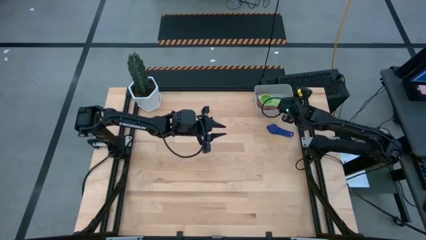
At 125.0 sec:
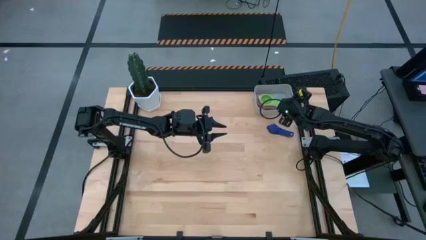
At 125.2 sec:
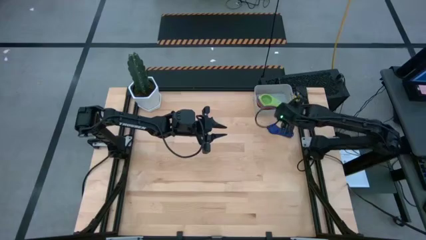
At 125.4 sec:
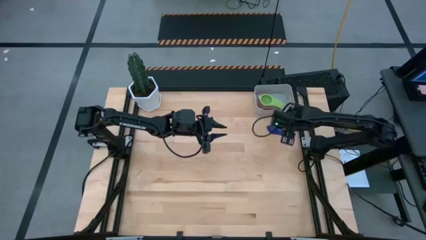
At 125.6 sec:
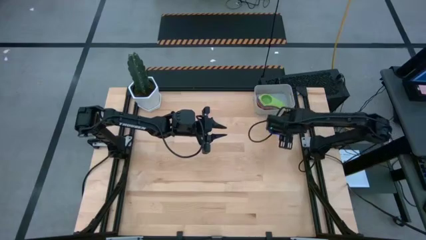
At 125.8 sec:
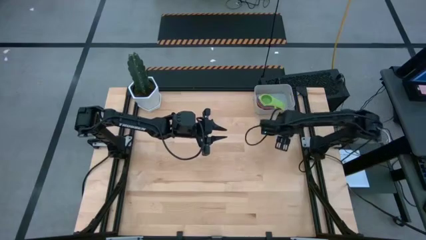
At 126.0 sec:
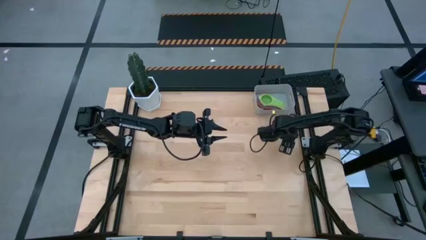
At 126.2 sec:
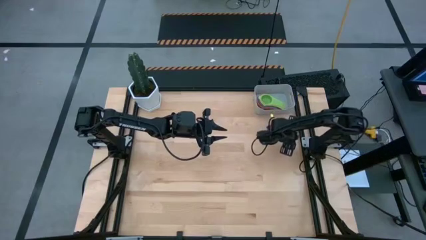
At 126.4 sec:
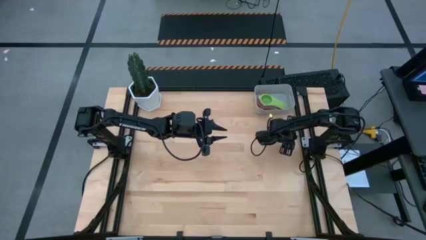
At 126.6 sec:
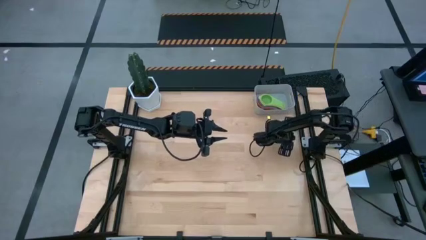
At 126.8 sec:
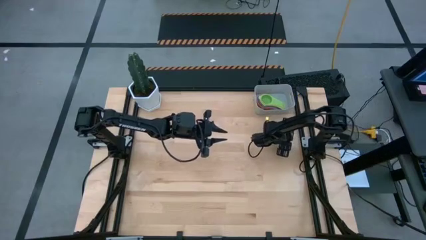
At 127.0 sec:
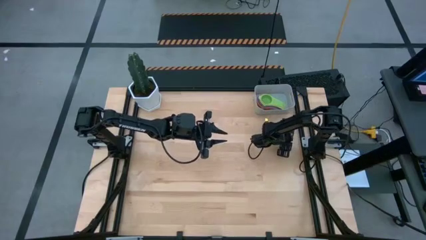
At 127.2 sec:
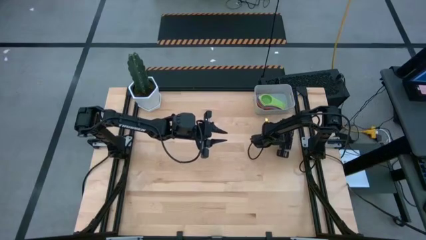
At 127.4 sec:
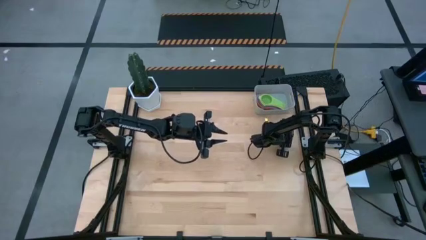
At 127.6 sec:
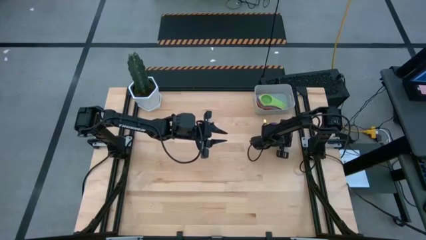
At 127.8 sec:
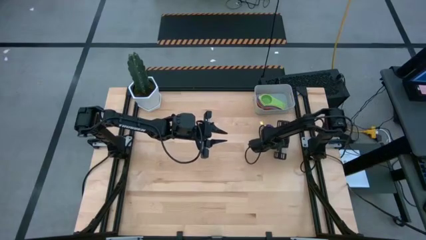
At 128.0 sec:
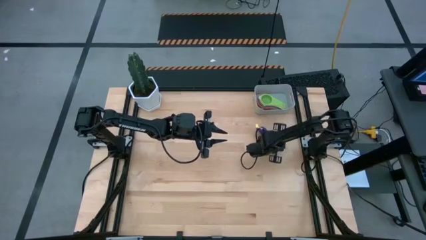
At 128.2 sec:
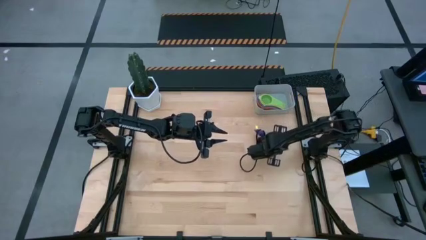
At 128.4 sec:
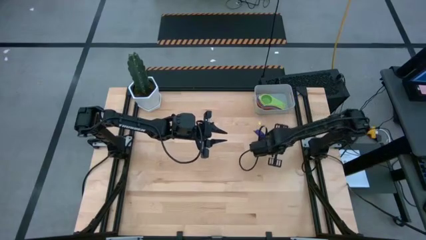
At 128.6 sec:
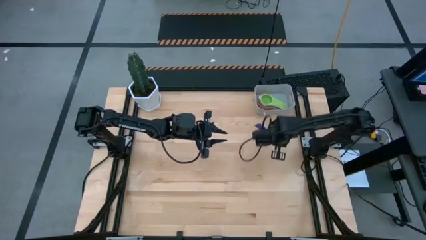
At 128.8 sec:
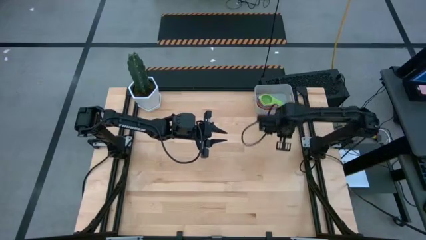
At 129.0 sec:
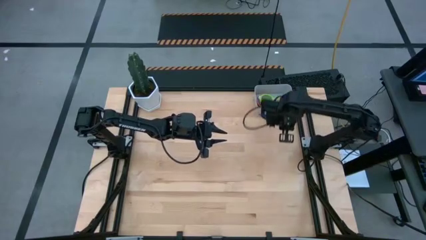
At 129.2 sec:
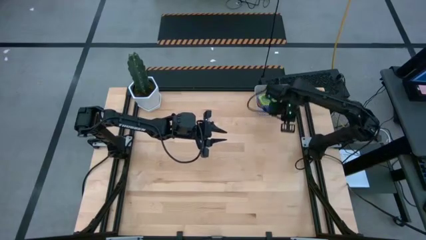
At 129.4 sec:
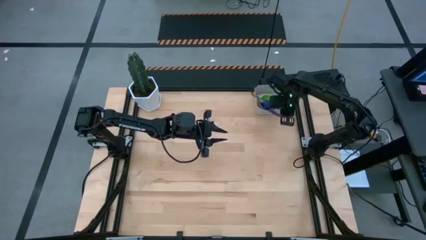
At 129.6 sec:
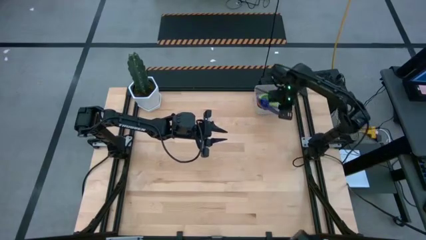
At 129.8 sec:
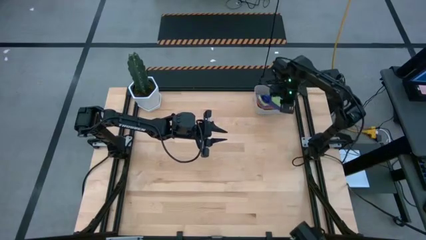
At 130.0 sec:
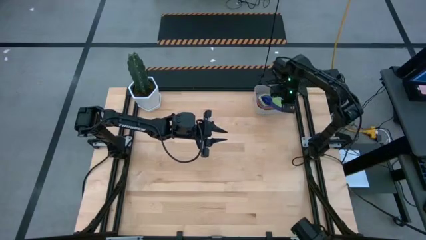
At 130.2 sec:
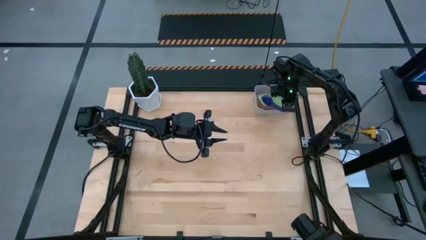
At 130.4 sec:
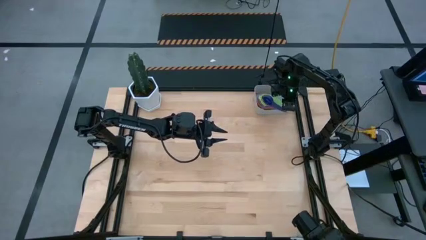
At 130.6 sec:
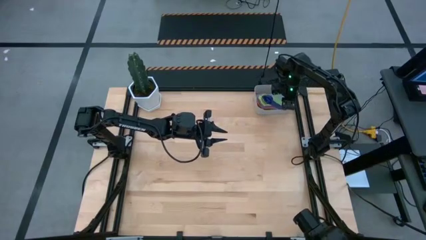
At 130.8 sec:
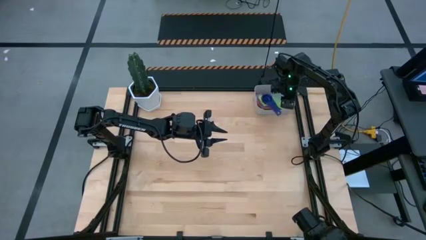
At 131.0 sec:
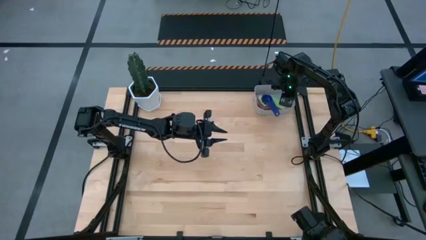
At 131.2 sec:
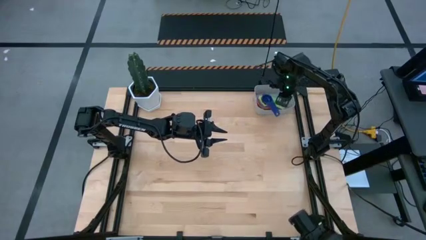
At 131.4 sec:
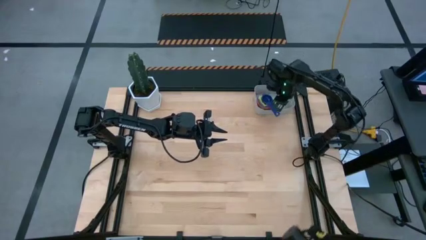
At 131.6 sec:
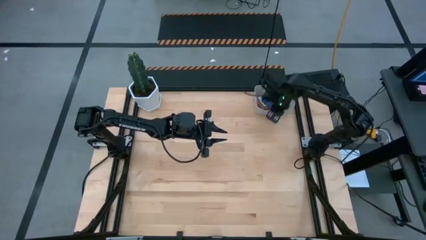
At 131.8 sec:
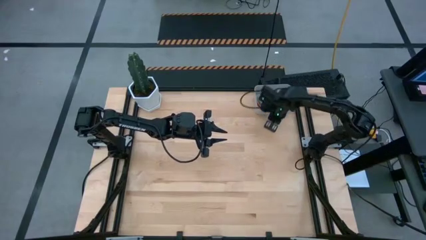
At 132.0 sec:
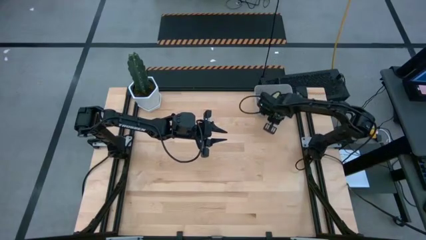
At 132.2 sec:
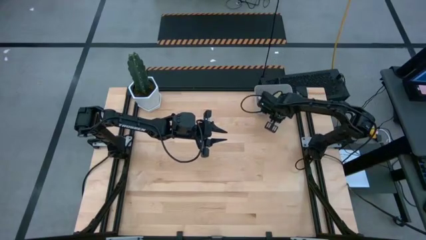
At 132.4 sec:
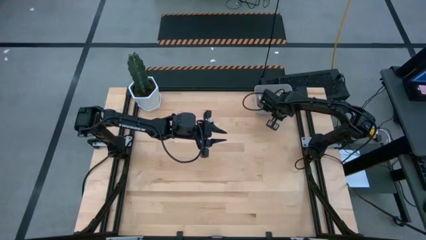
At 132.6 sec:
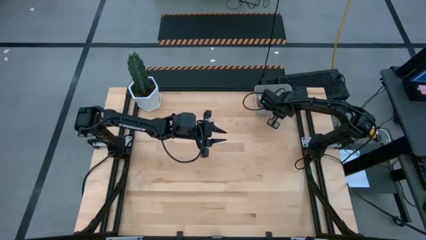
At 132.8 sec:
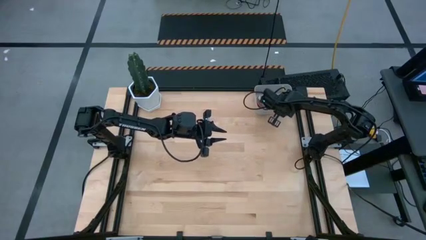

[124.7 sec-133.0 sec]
Task: Nest measuring cups in basket
Stack the dark blue measuring cup on top of the green measuring cup into the gray bin

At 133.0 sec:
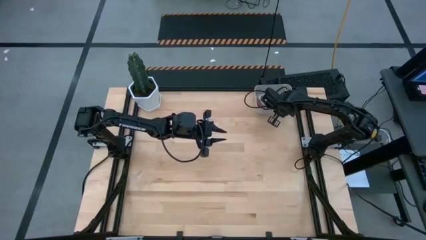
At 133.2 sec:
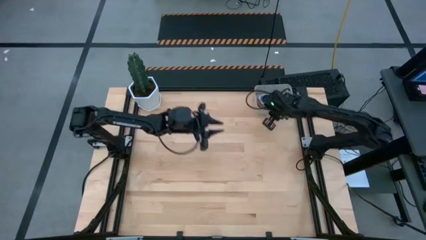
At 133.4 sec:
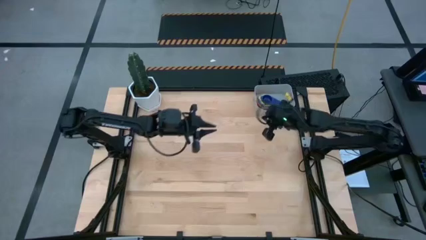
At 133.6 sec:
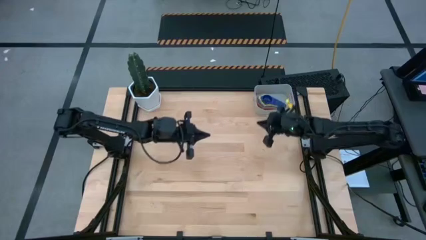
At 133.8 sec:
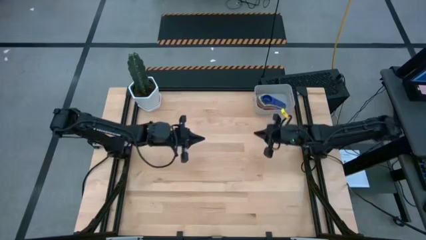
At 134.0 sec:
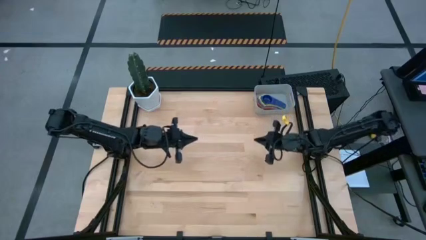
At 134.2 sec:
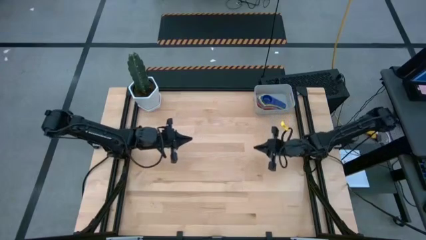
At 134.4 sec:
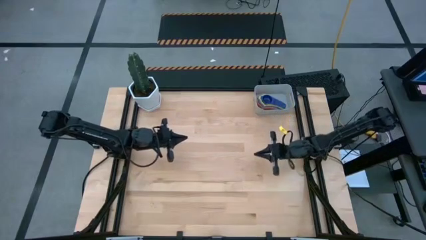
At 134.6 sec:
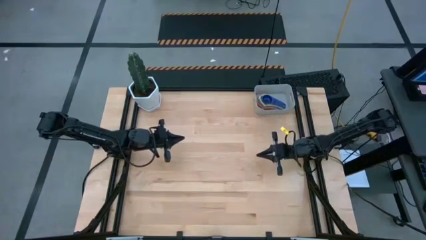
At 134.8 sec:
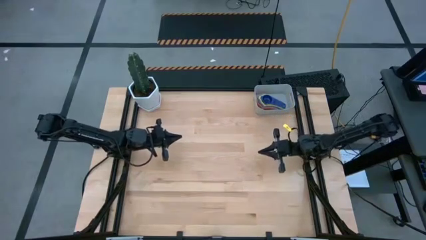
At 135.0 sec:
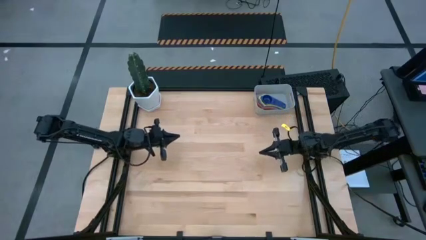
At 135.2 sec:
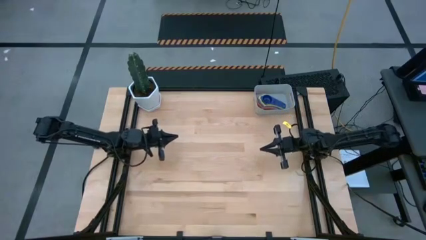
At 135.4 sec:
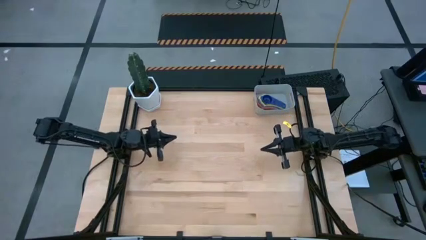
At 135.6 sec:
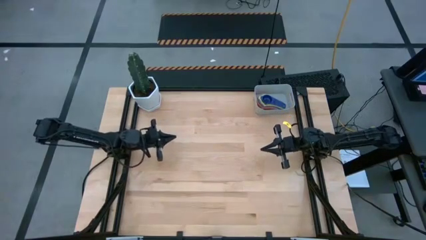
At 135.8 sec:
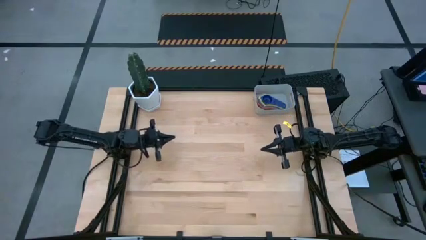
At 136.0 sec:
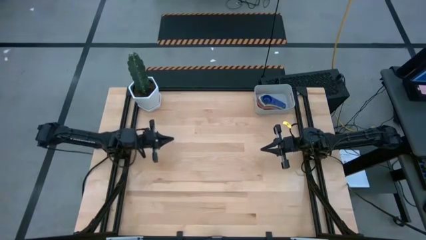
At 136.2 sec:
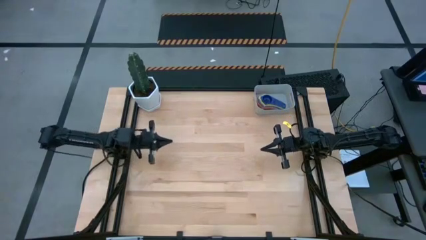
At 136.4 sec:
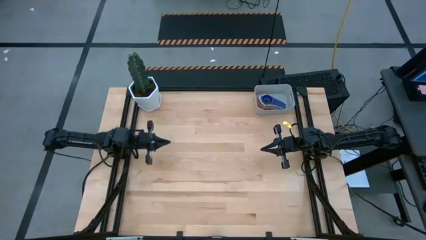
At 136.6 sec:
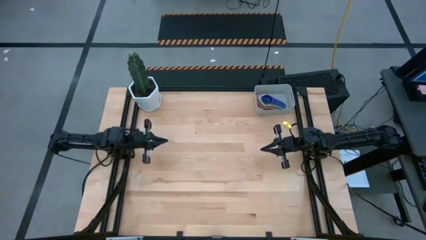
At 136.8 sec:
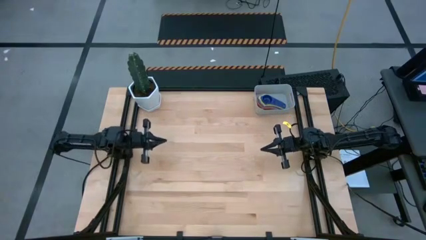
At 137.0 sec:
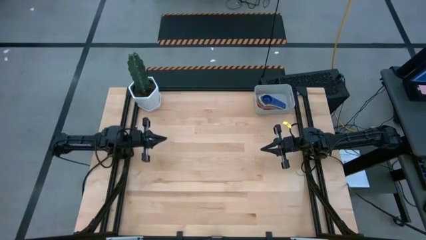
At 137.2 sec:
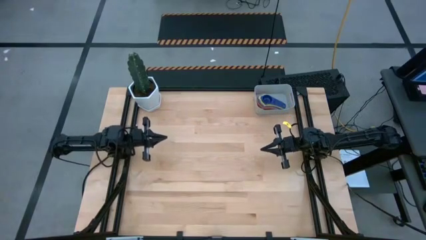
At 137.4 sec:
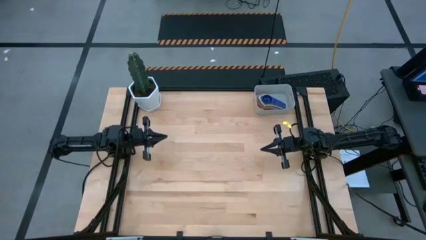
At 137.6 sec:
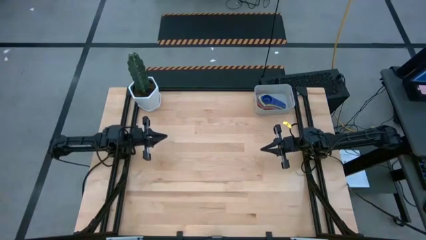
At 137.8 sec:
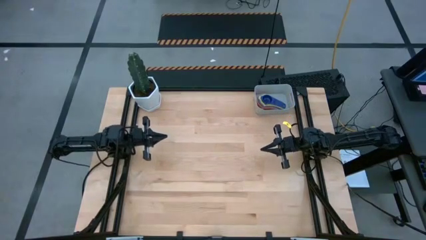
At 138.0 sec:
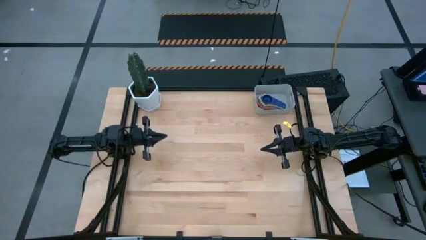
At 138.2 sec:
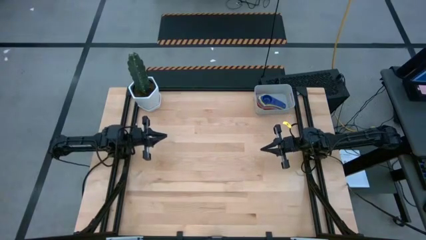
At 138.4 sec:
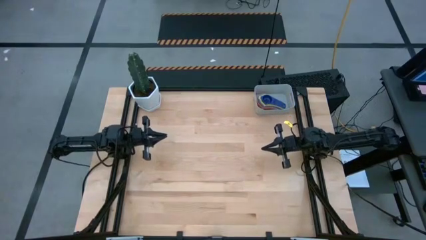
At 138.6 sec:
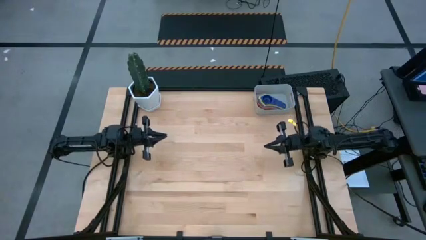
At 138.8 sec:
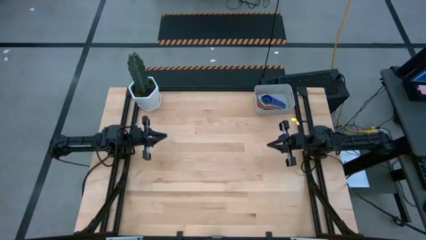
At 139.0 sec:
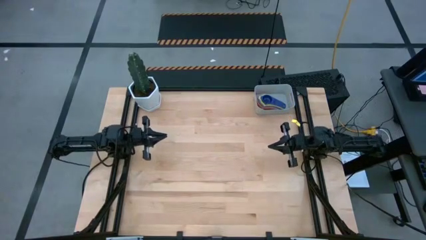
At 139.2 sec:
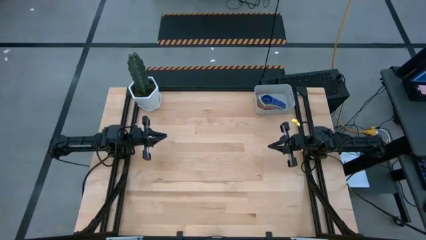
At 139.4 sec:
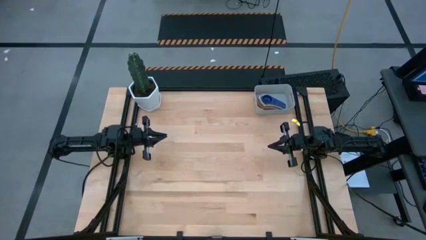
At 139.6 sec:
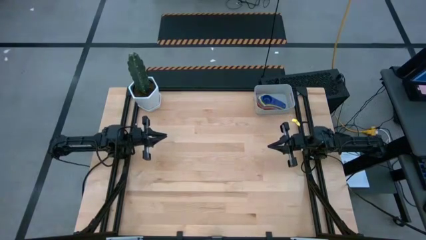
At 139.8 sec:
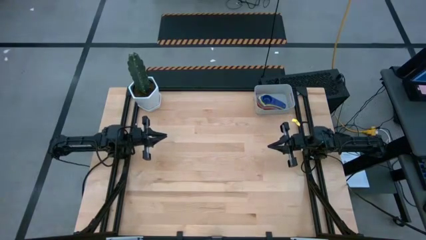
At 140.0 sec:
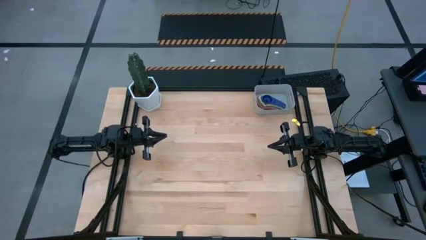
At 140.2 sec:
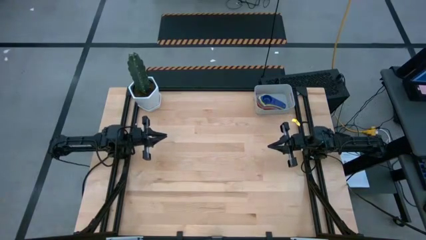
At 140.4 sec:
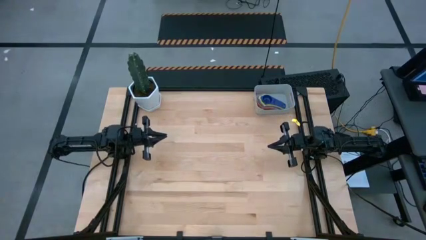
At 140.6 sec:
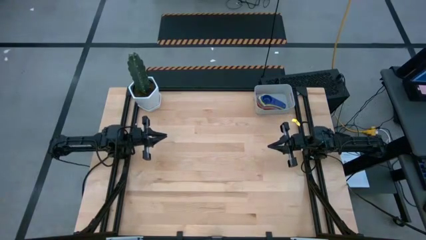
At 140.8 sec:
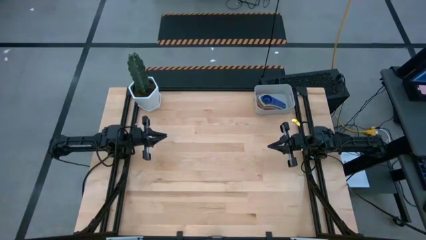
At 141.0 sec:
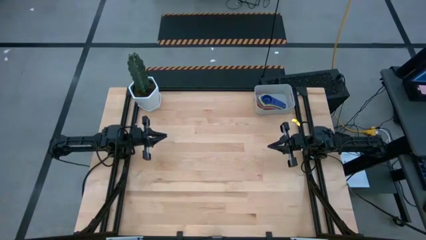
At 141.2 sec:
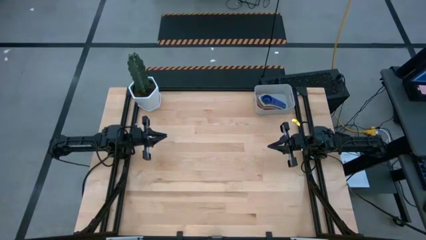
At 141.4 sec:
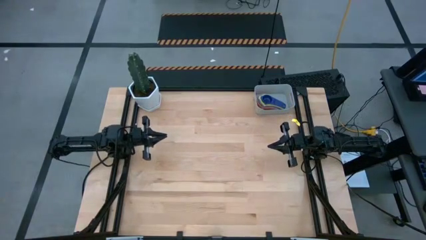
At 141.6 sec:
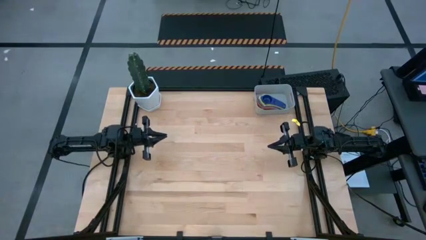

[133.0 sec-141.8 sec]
Return to Home Position
